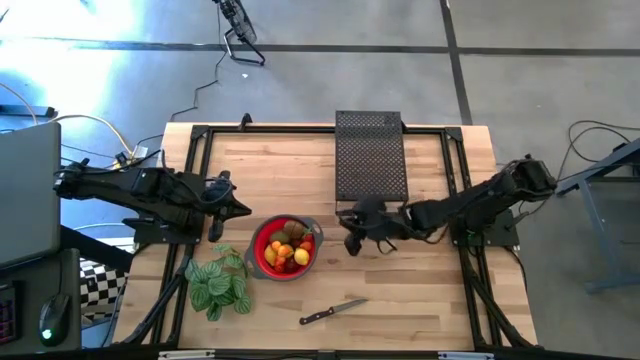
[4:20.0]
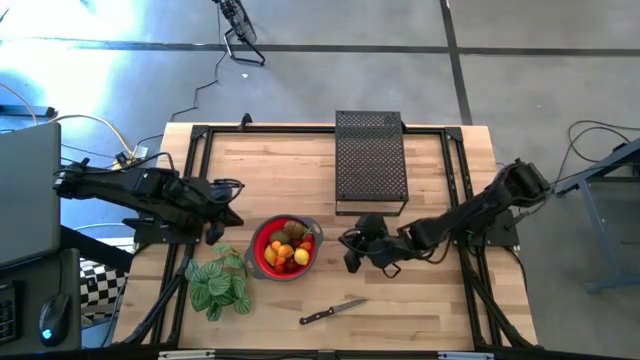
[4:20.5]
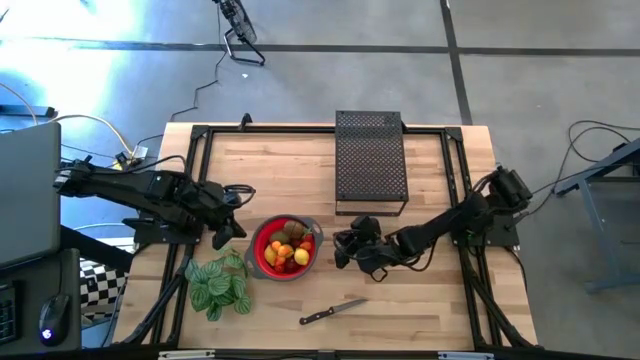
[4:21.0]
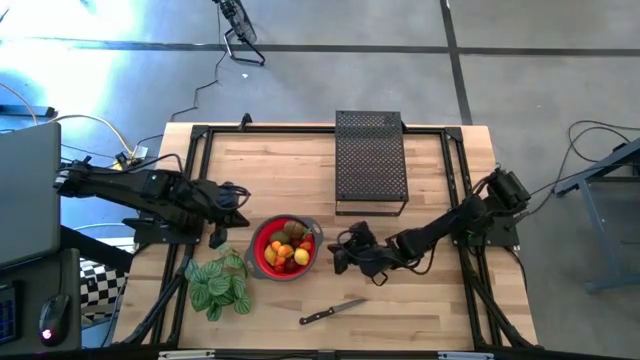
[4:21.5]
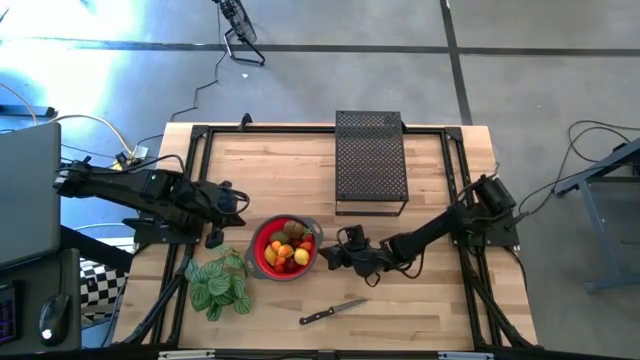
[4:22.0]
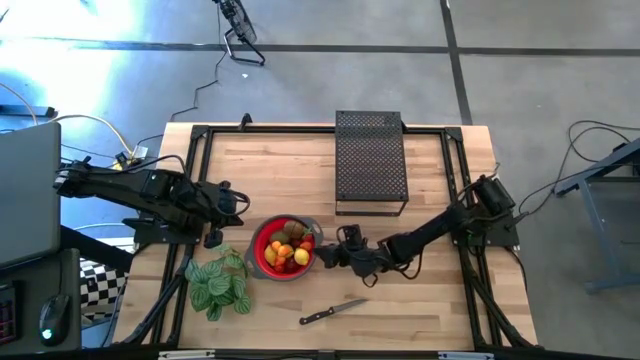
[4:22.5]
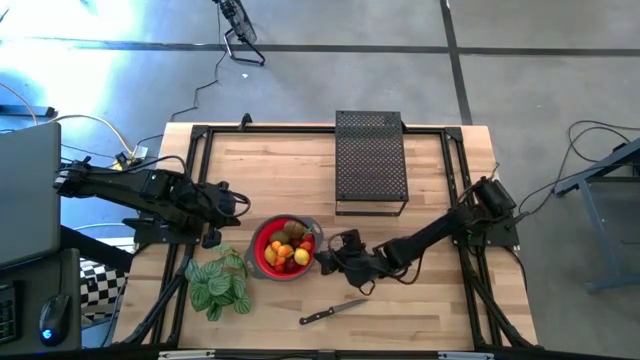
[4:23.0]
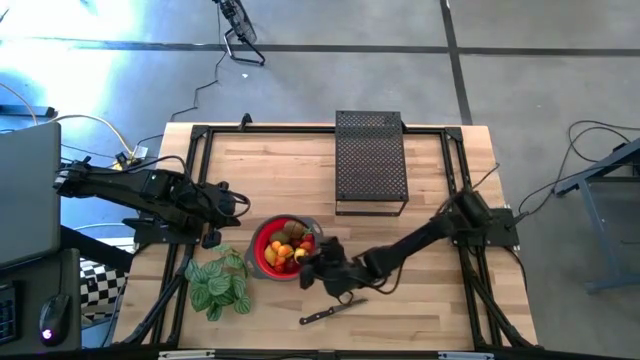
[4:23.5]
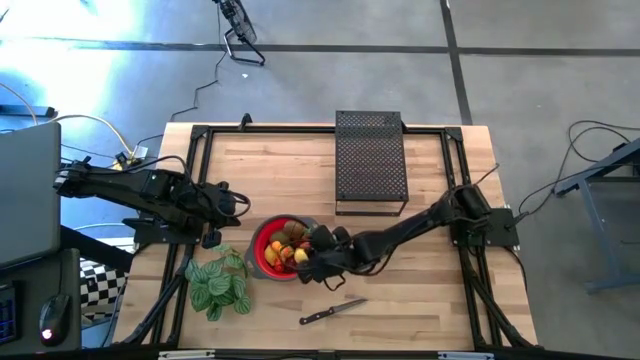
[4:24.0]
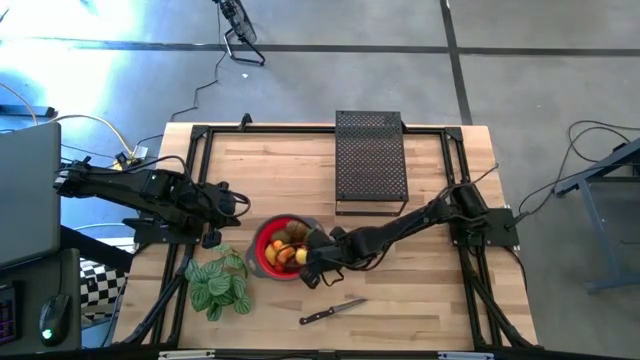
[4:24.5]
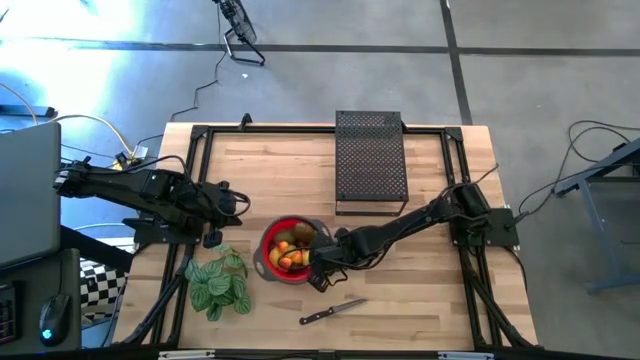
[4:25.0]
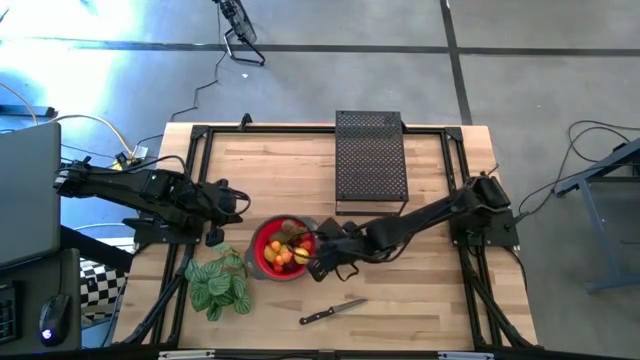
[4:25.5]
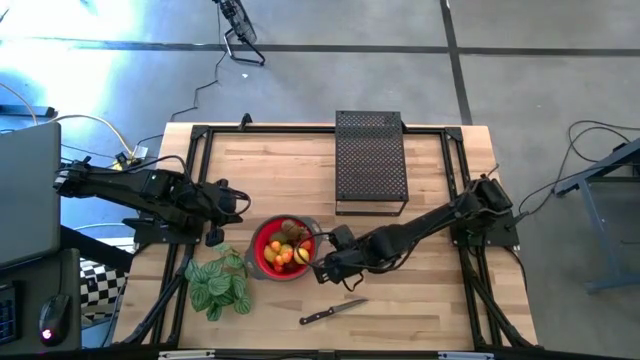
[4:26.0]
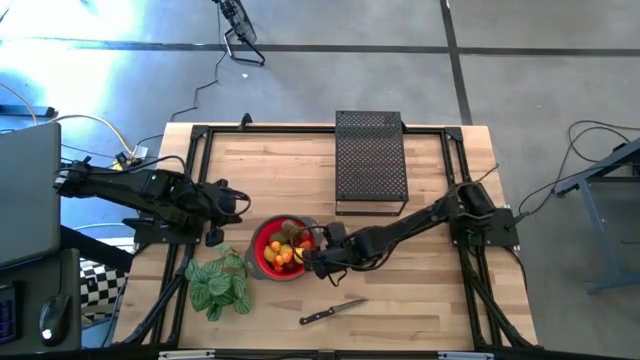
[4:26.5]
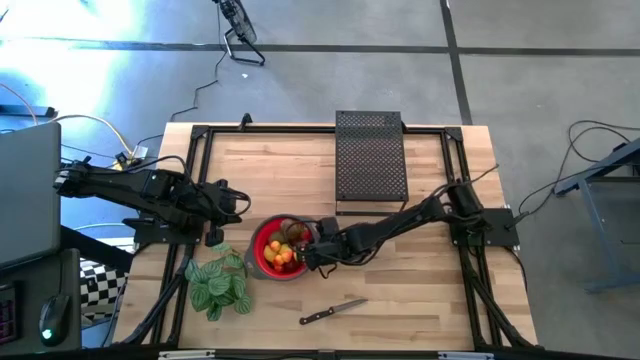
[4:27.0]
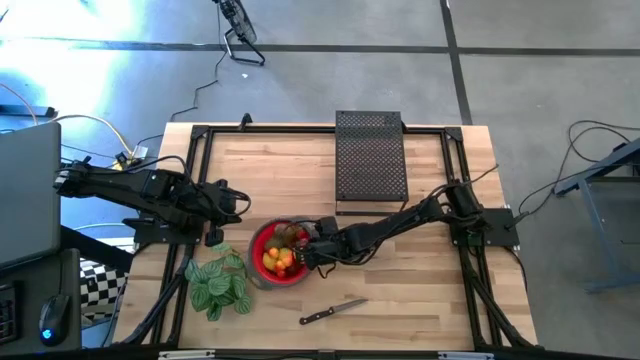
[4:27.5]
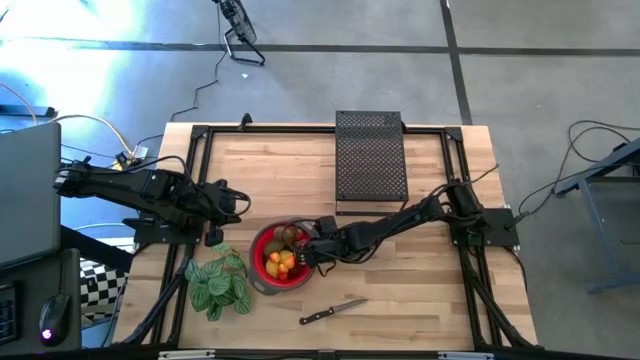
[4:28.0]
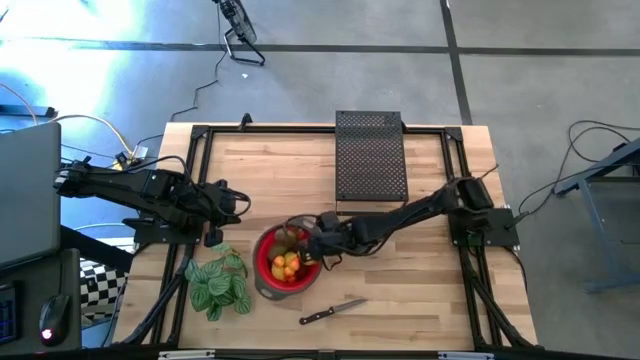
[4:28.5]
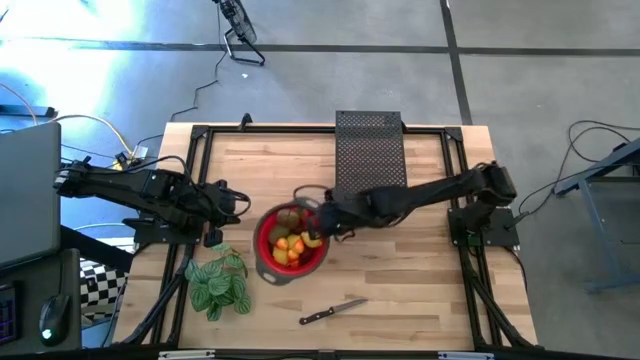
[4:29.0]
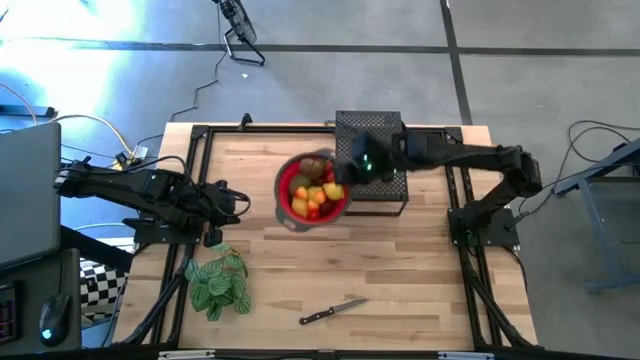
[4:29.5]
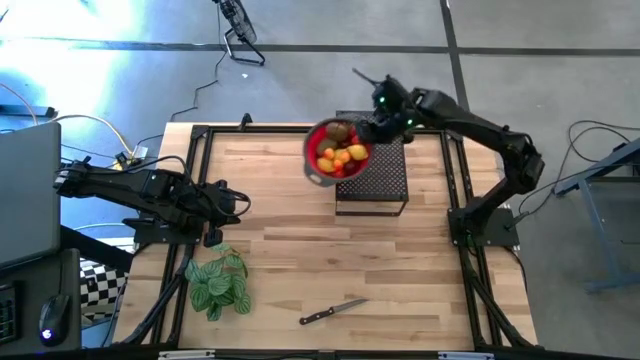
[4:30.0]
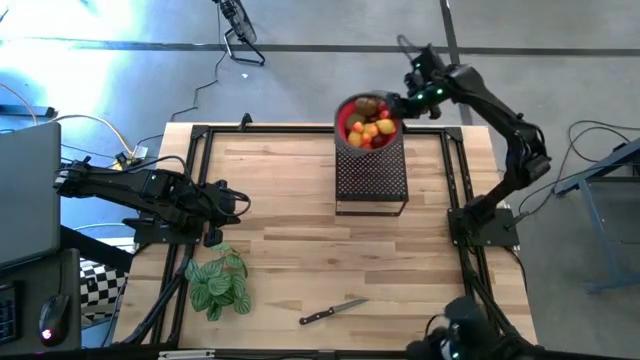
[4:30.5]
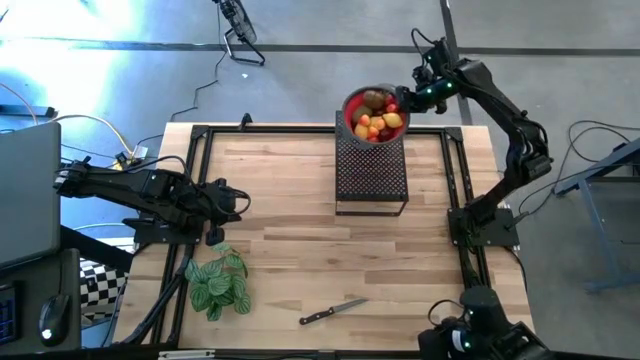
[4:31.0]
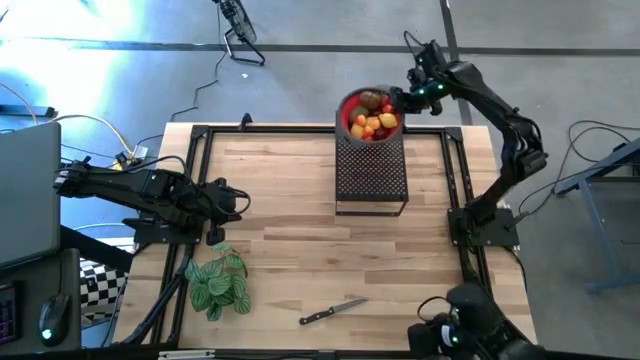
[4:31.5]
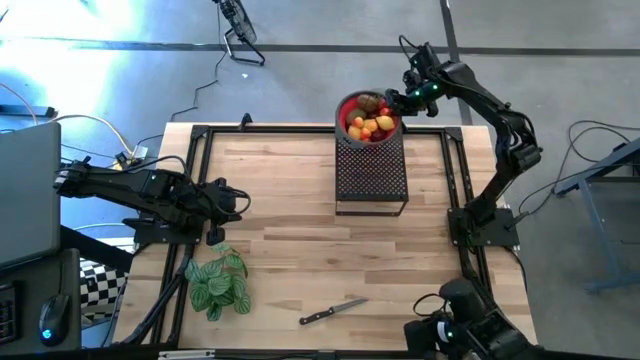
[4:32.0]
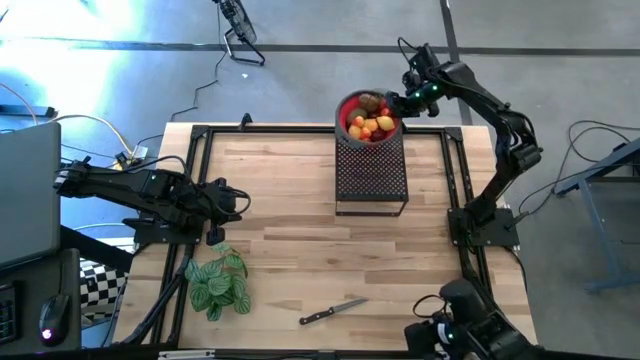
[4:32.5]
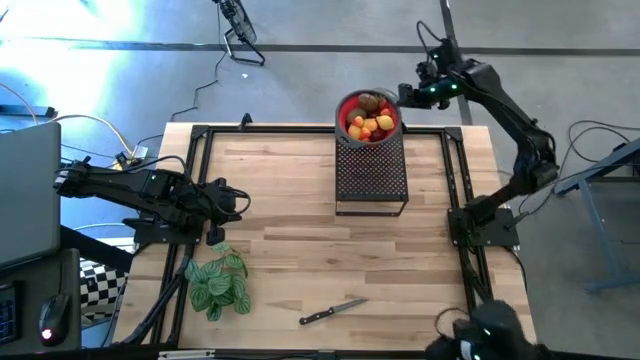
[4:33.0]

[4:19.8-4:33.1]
Task: Pick & Place Fruit
Put the strainer bowl on the shelf

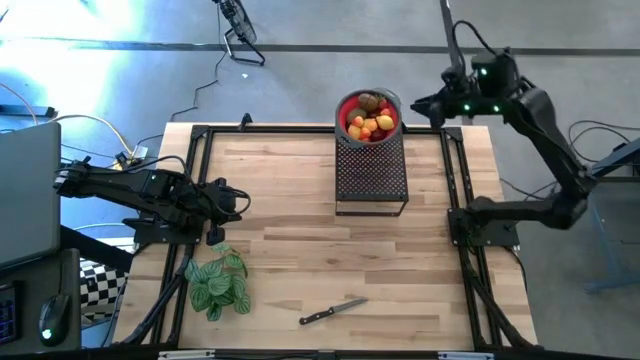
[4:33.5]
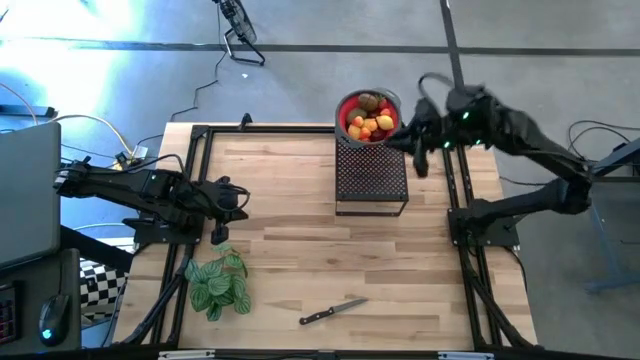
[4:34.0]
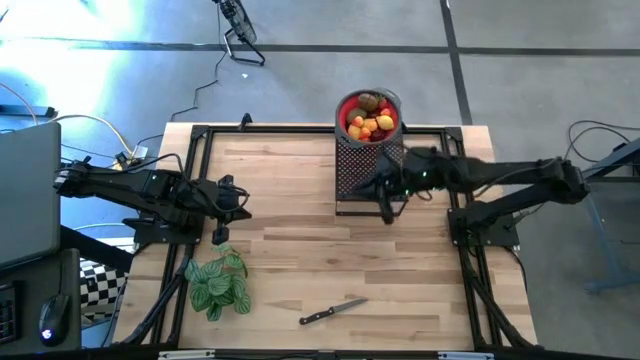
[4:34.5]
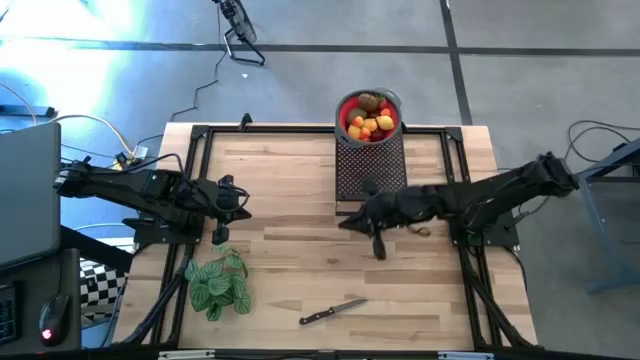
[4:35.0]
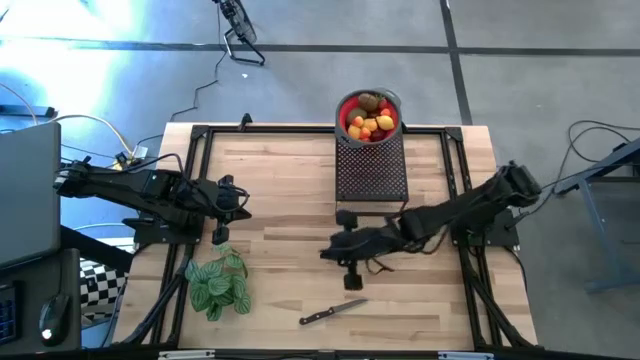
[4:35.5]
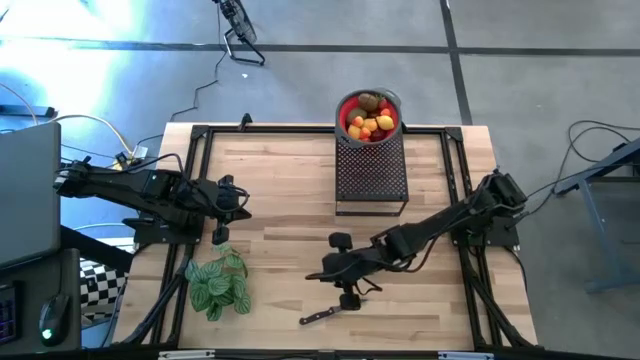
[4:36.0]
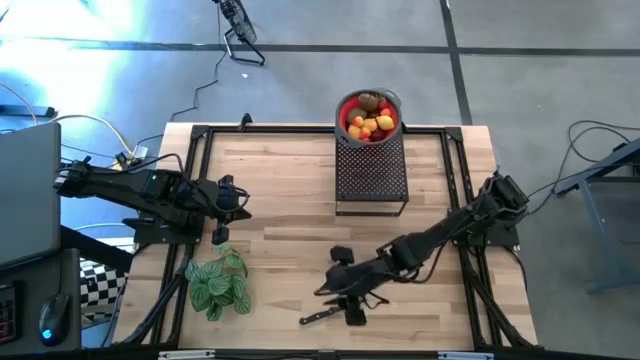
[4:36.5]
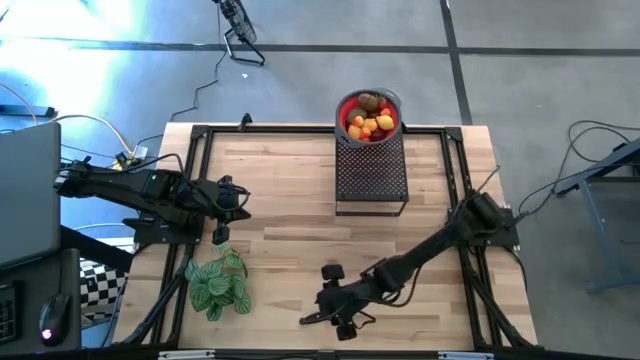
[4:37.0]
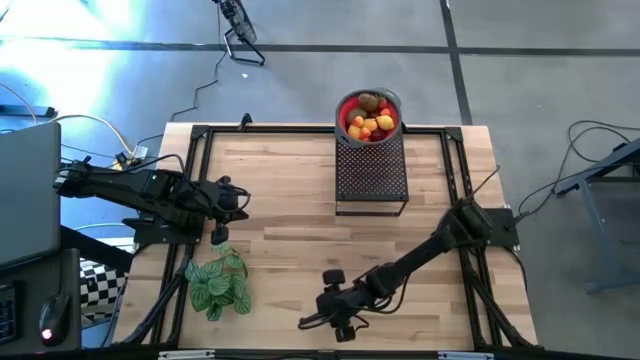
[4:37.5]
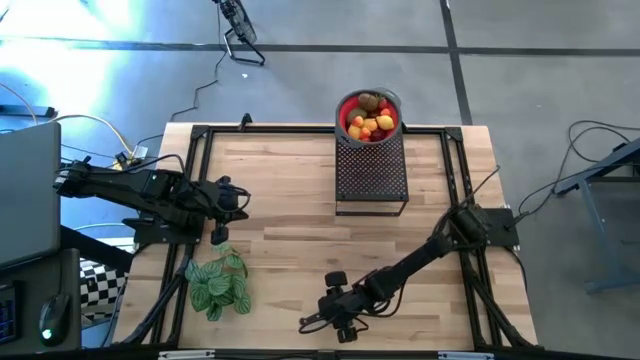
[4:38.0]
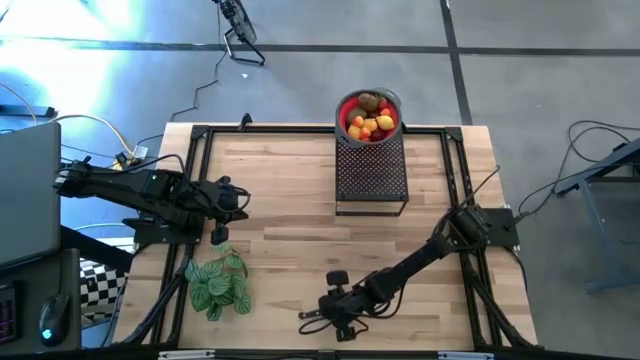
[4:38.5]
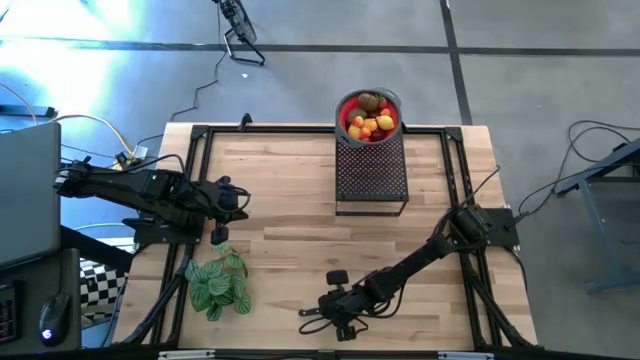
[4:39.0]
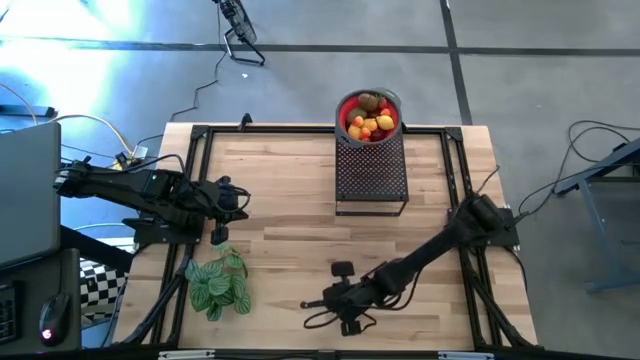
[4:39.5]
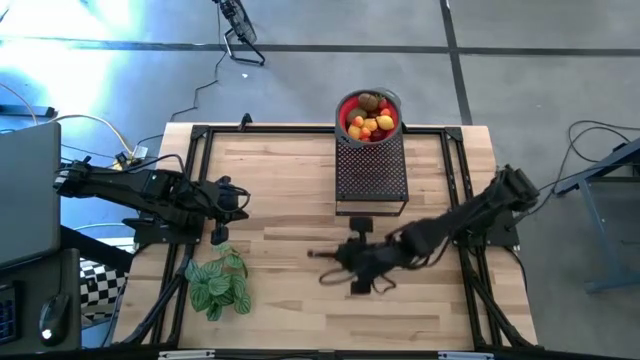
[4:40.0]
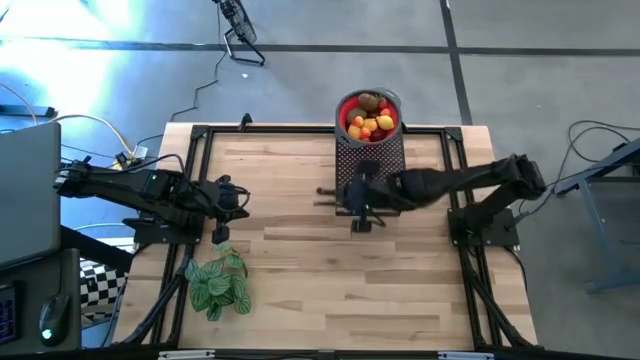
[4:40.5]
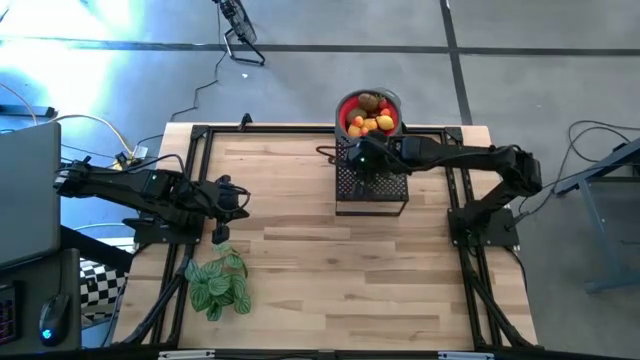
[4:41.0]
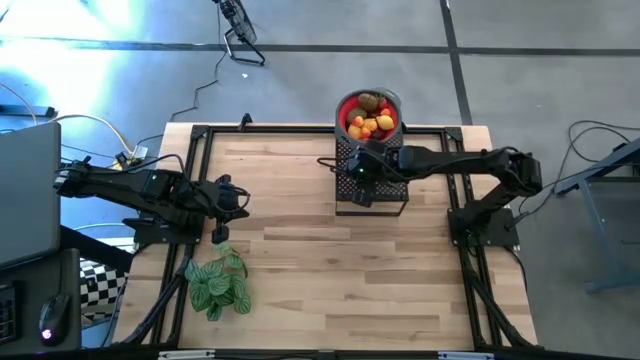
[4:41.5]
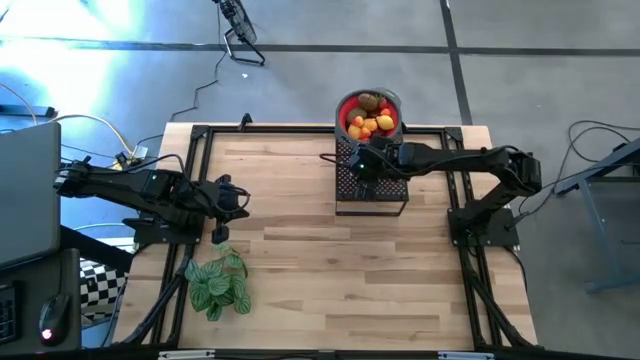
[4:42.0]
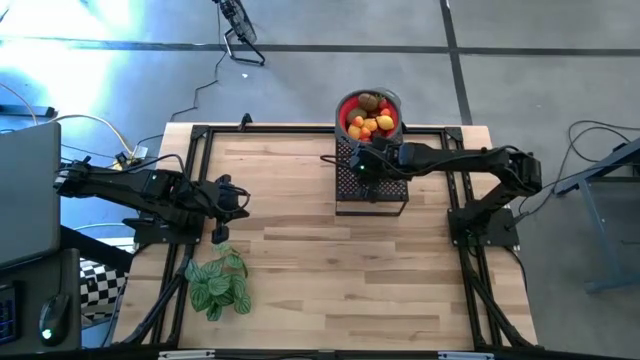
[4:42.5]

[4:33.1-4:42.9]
Put the black knife on the shelf
